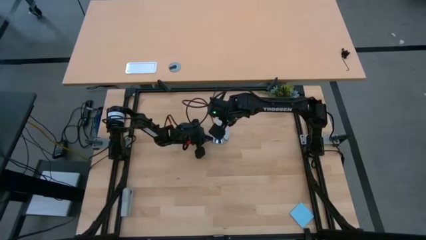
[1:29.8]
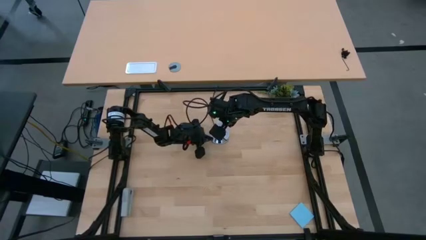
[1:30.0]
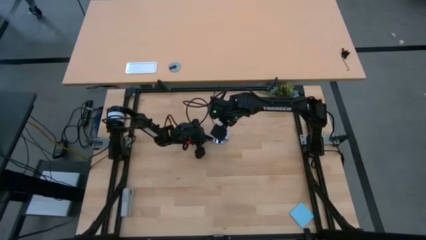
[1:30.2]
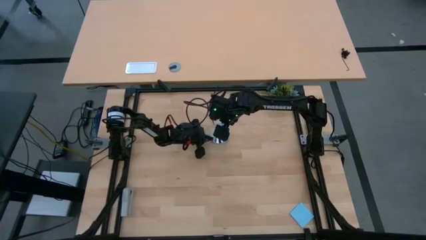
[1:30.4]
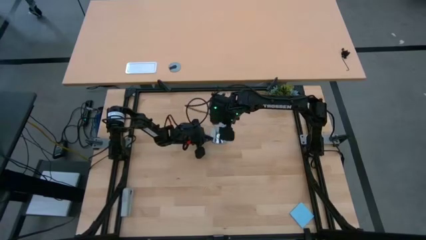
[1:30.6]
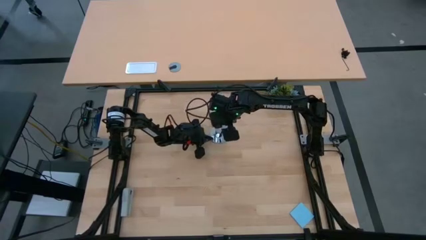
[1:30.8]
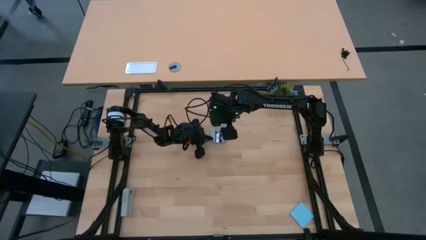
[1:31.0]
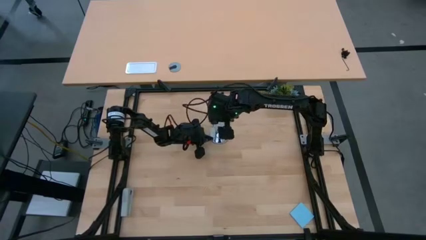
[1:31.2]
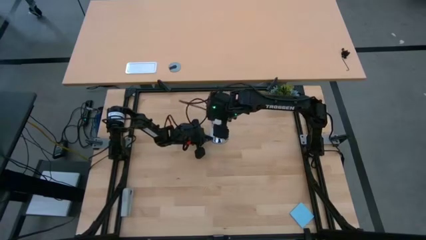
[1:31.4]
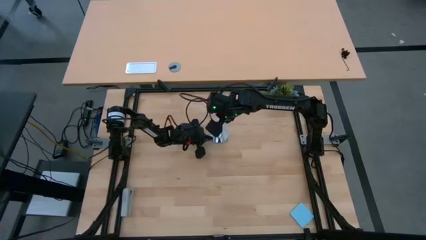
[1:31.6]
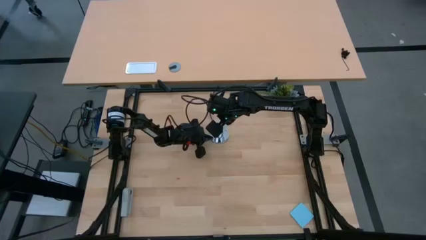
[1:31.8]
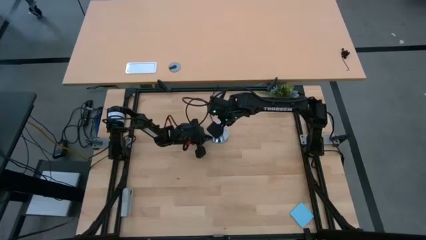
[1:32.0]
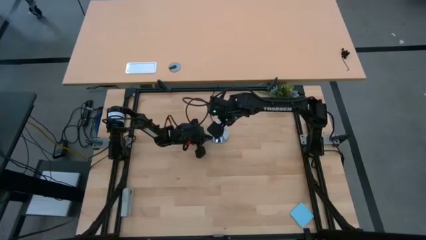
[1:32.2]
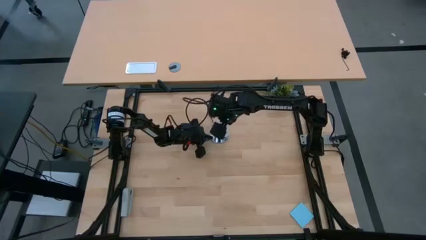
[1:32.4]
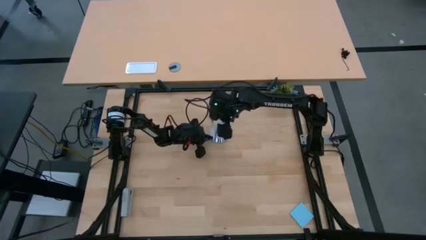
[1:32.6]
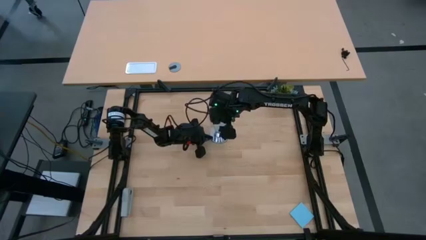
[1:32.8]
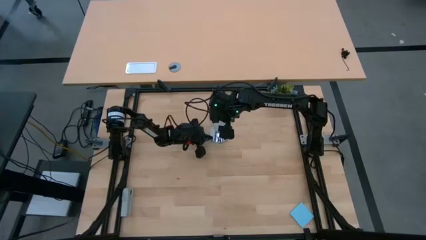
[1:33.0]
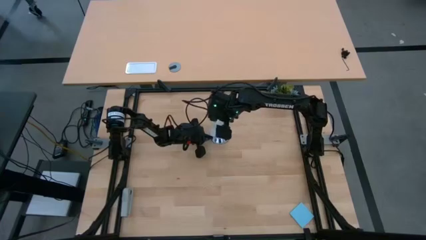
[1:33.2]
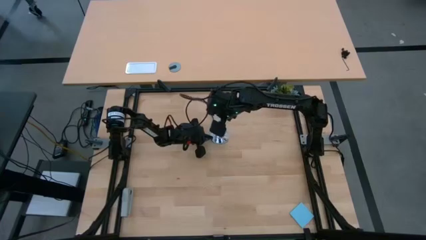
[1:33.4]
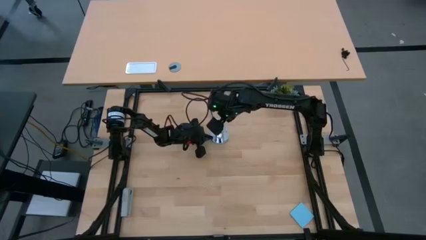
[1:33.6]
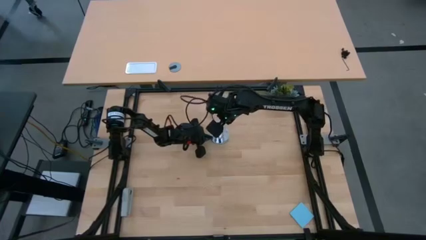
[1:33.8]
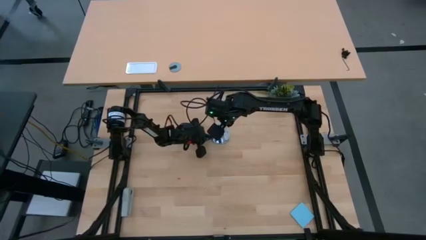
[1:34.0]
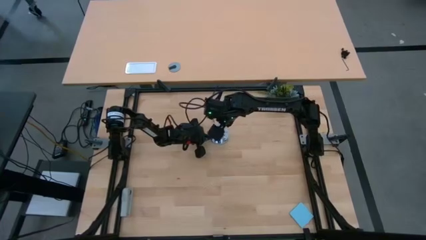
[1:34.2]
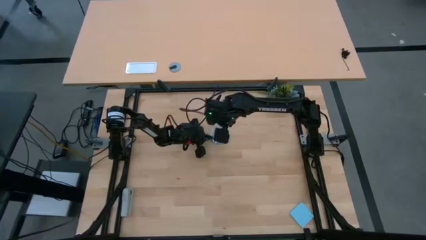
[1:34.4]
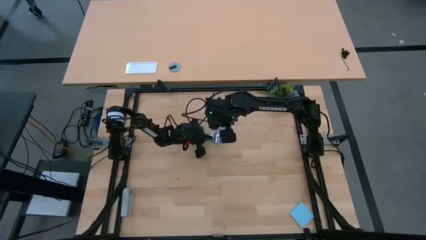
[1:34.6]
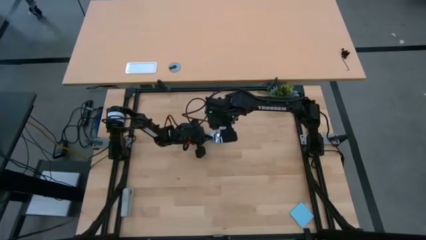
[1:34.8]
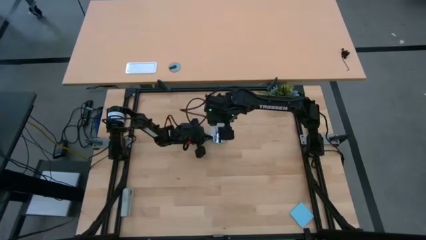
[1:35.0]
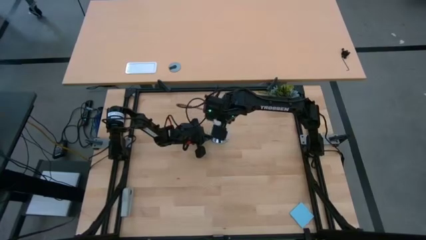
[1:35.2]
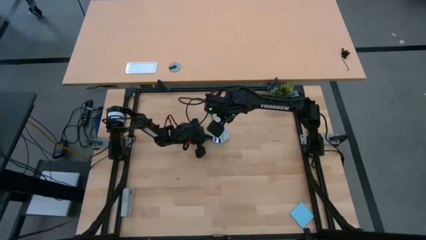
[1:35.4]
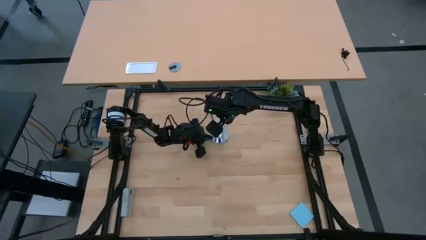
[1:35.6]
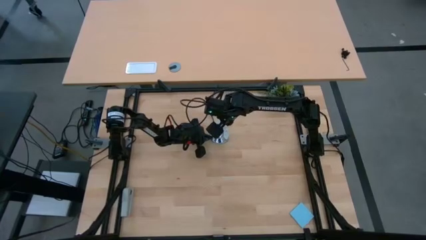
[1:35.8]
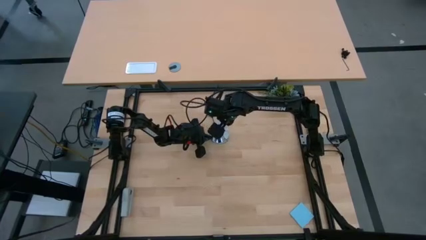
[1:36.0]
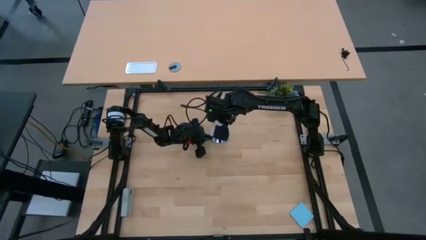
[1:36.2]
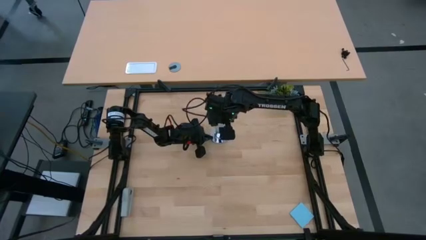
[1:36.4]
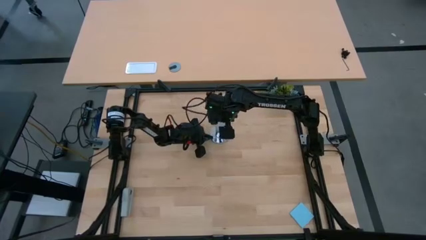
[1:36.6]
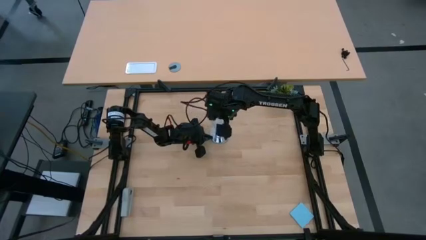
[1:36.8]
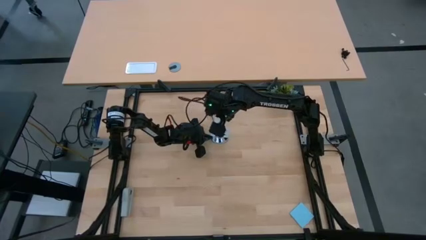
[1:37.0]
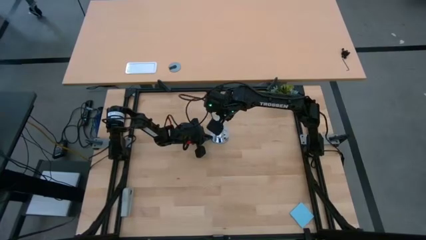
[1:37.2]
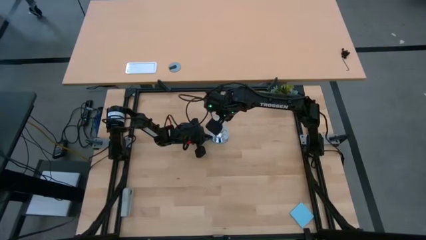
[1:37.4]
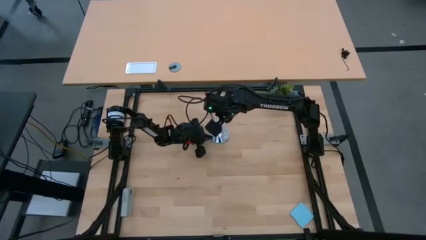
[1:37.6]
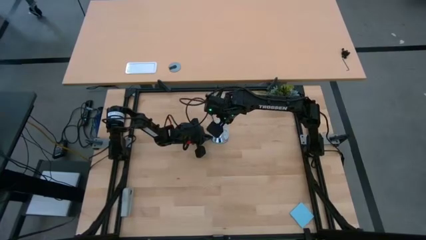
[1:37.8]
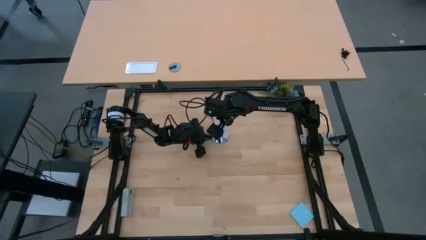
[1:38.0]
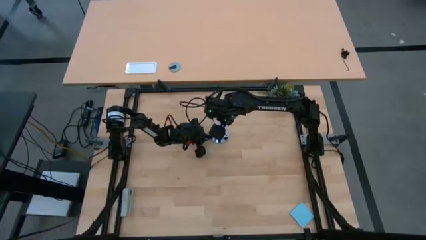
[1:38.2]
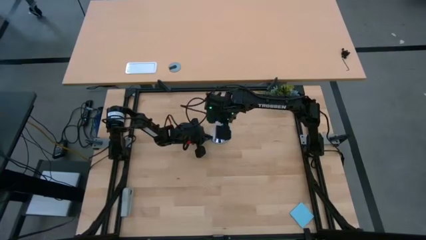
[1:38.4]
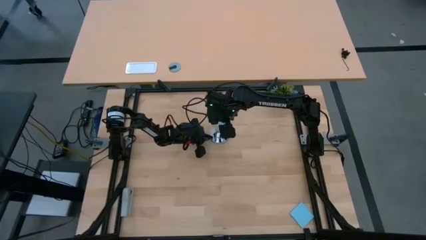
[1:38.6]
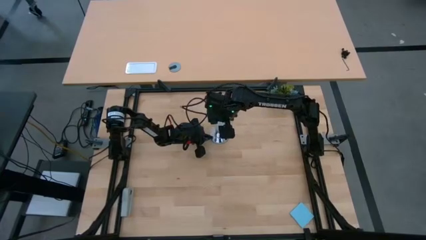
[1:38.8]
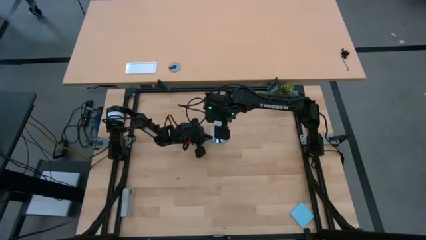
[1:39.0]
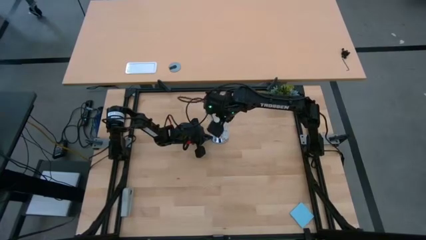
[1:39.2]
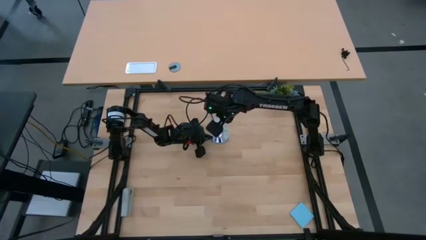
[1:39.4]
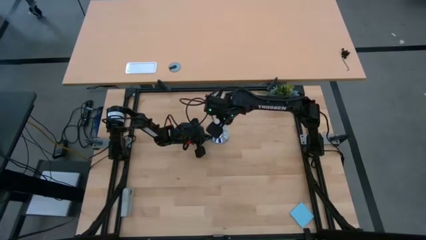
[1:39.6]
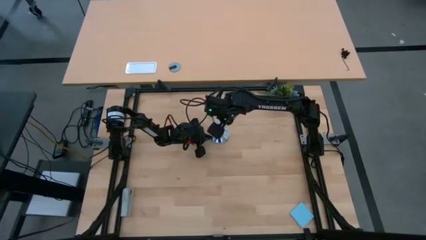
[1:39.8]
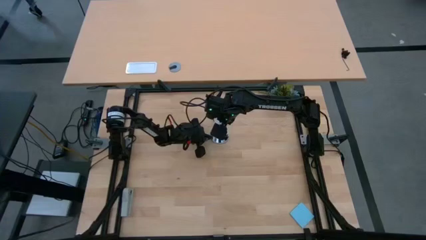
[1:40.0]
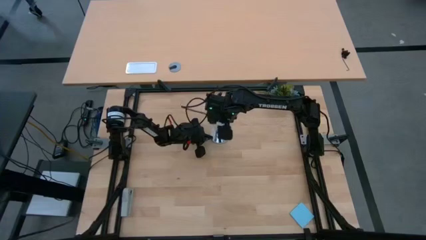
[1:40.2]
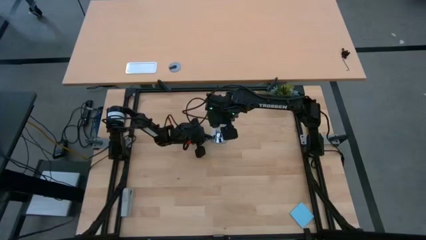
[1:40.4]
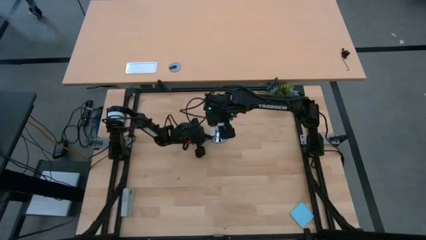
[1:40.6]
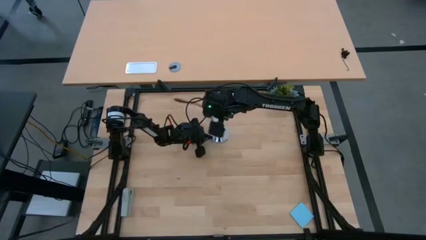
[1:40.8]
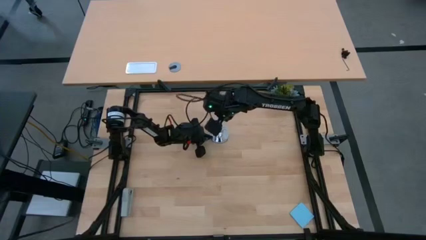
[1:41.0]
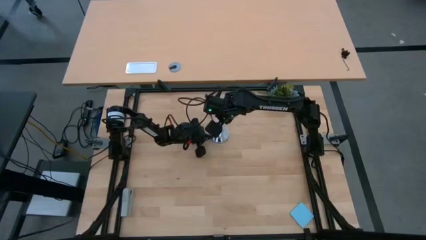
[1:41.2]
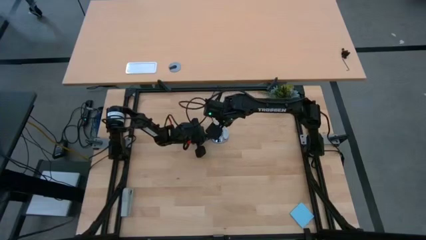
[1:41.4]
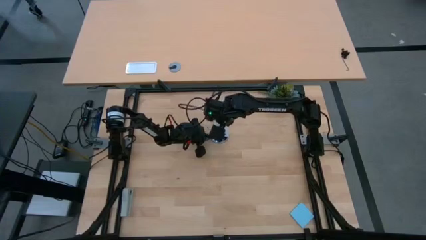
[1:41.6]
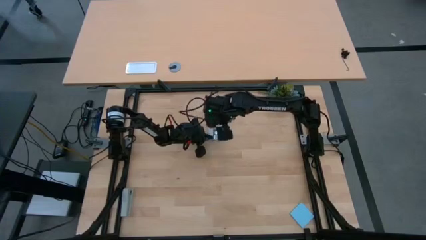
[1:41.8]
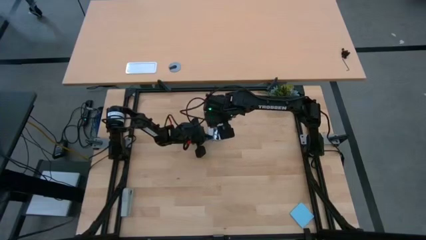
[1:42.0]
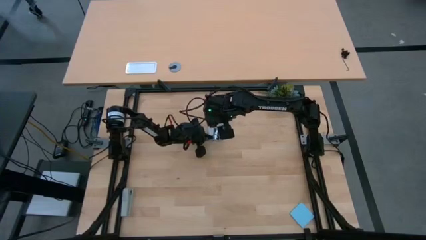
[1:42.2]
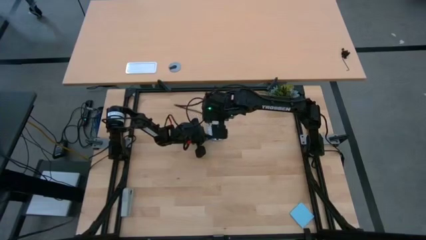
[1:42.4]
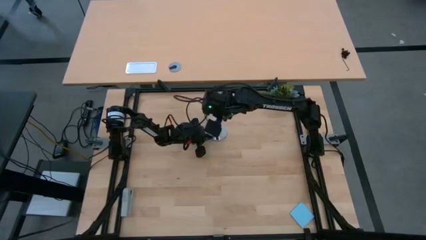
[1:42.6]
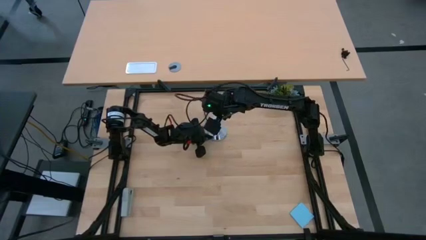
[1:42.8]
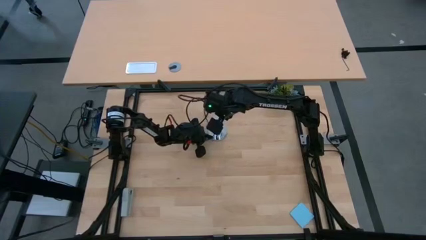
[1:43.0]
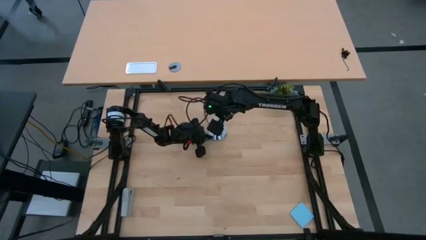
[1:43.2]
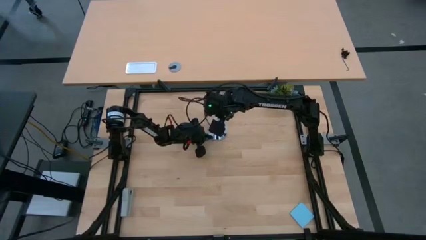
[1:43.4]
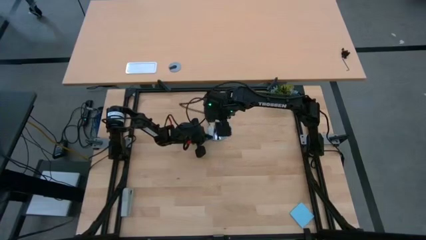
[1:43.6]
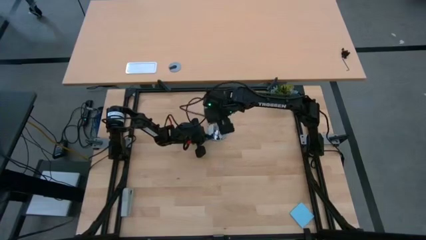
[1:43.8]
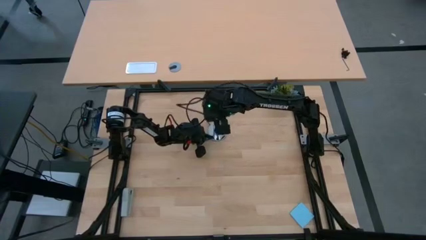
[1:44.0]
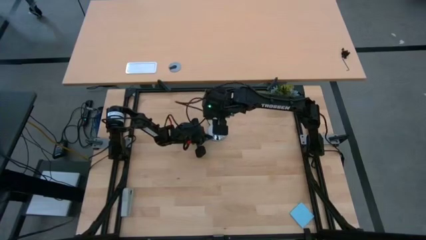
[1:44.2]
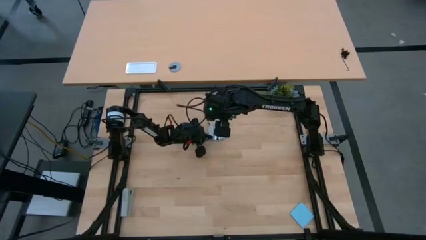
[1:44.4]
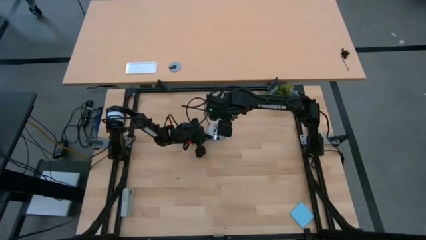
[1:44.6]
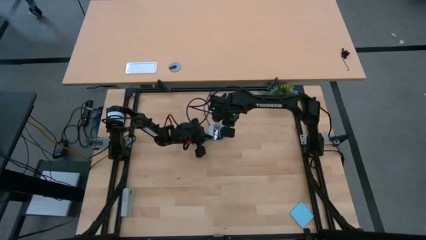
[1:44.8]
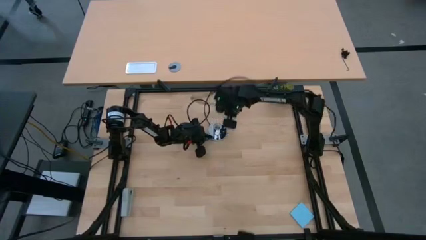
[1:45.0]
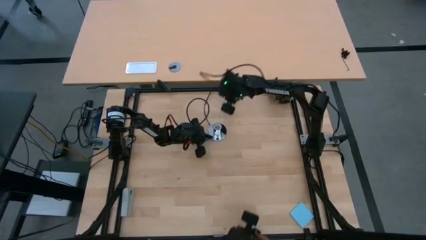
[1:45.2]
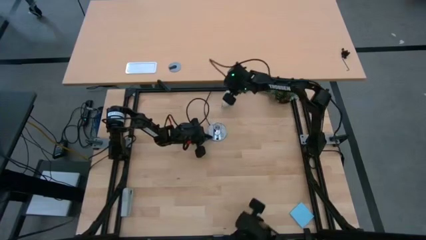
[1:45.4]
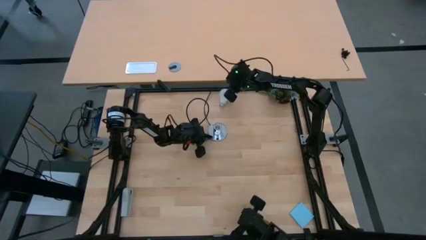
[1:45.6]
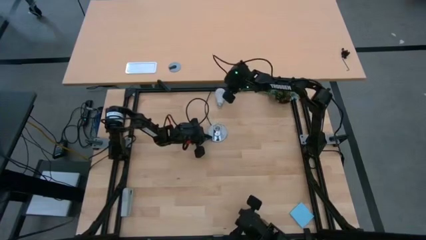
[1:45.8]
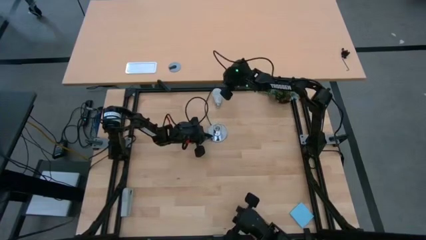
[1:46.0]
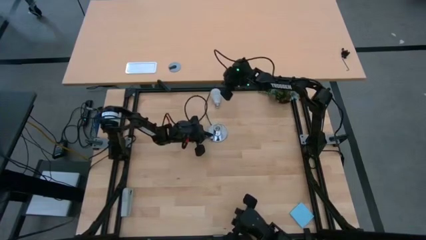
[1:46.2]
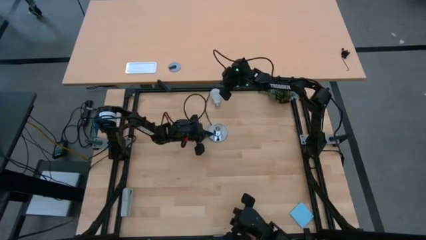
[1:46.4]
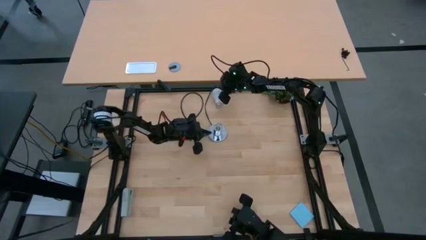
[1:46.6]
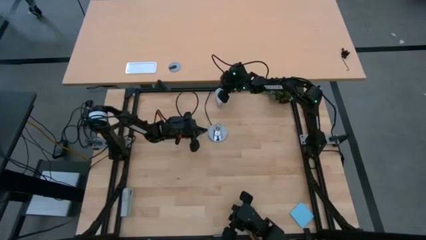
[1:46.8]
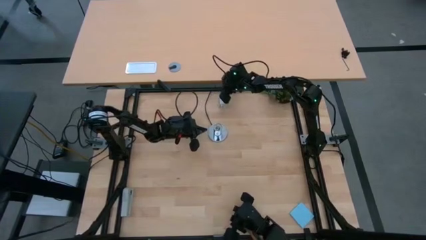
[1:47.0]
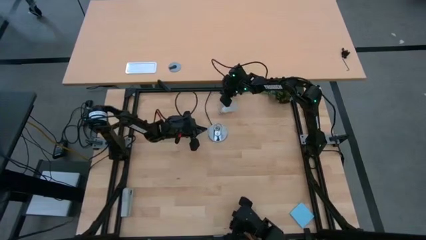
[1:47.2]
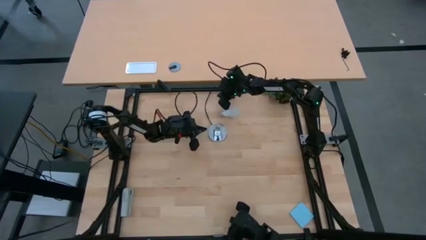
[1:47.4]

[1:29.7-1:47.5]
Task: Screw lightbulb
Remove the lightbulb from the lamp socket
